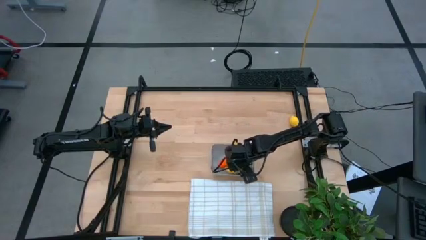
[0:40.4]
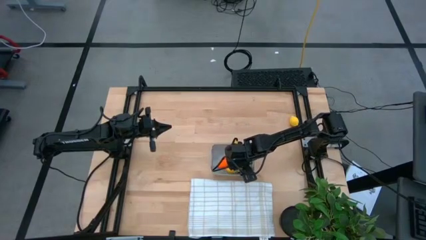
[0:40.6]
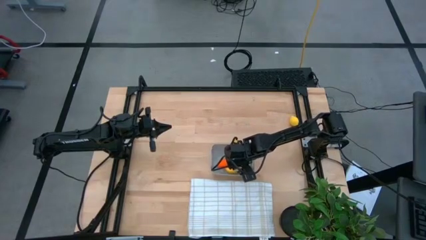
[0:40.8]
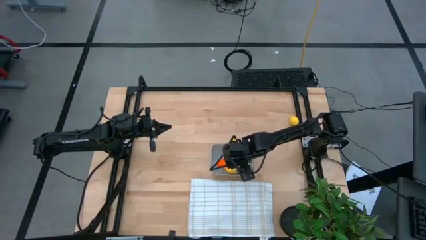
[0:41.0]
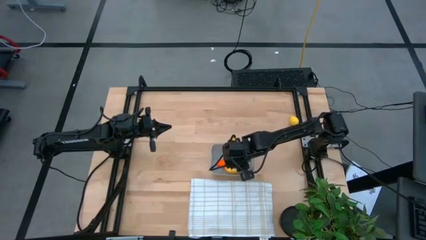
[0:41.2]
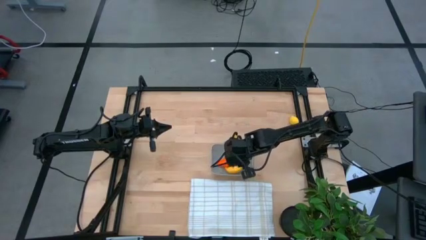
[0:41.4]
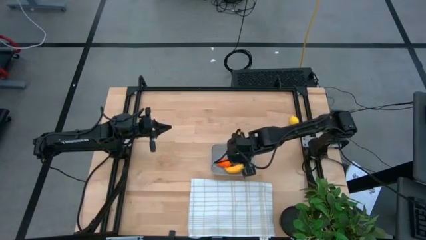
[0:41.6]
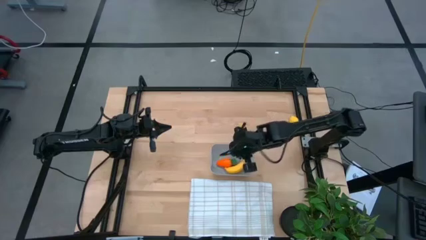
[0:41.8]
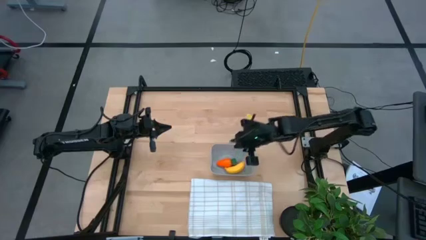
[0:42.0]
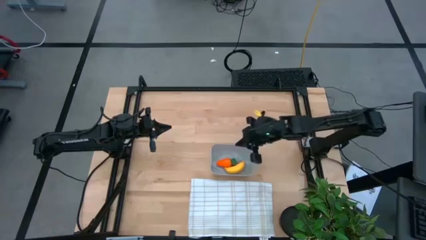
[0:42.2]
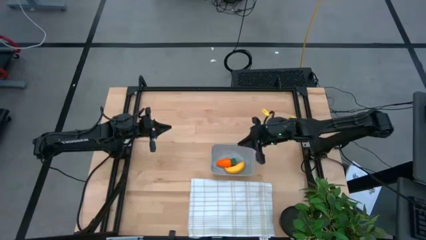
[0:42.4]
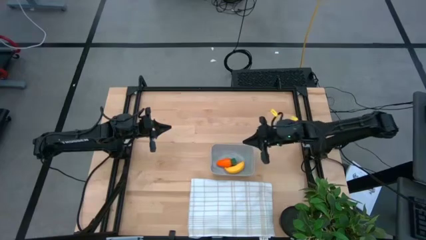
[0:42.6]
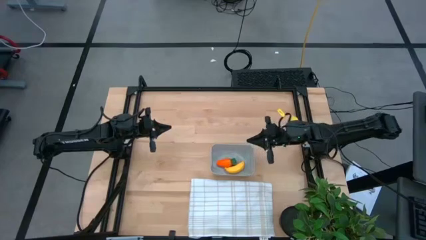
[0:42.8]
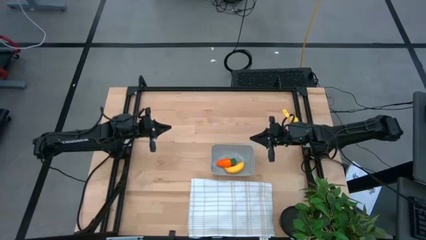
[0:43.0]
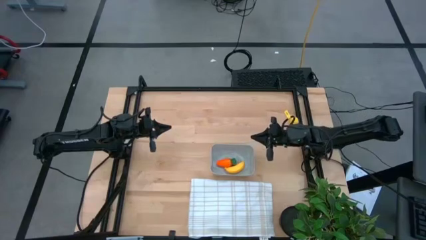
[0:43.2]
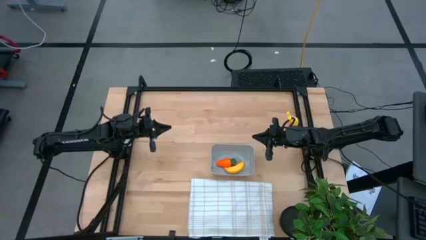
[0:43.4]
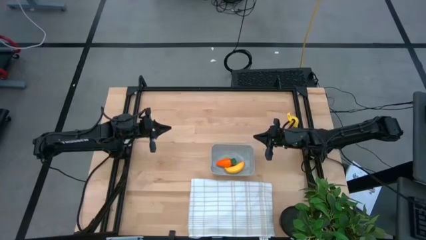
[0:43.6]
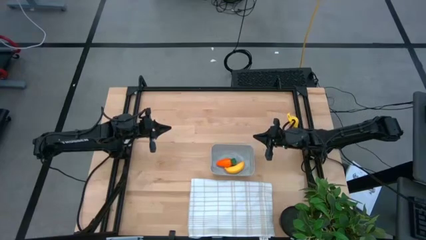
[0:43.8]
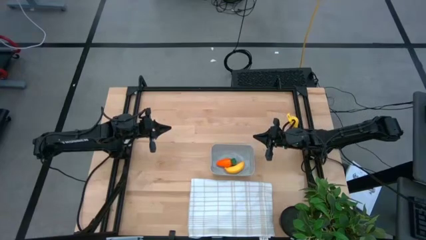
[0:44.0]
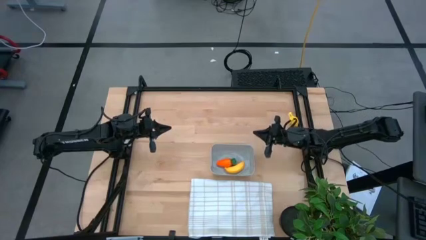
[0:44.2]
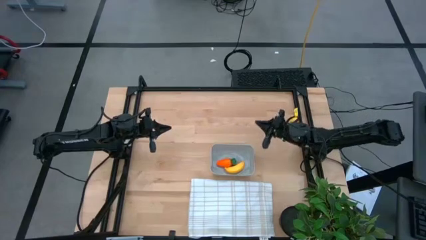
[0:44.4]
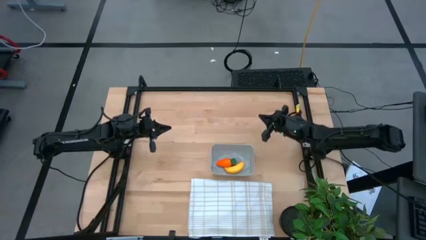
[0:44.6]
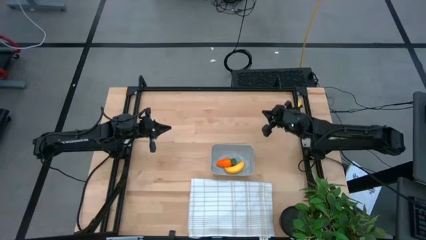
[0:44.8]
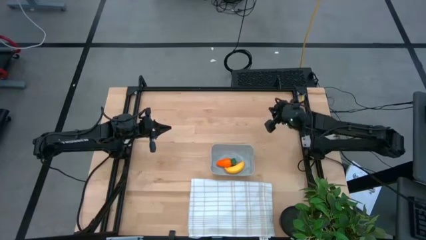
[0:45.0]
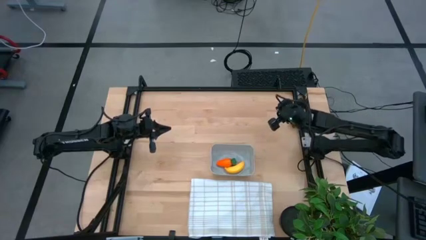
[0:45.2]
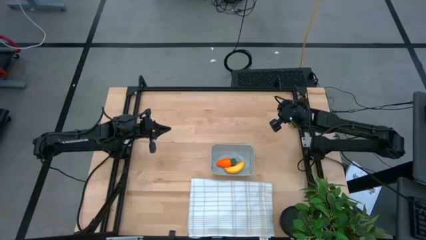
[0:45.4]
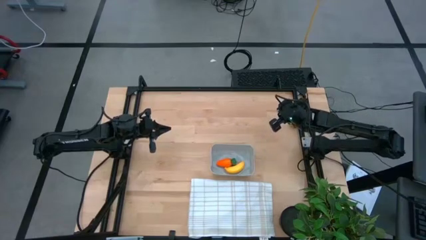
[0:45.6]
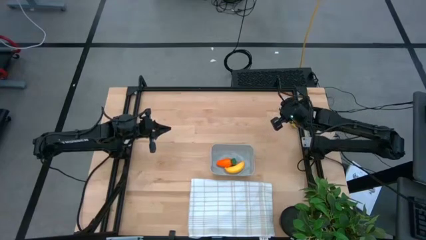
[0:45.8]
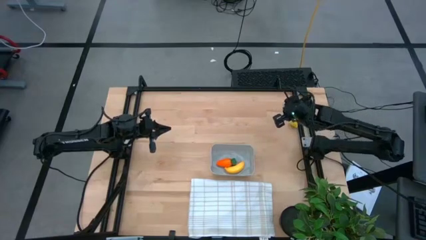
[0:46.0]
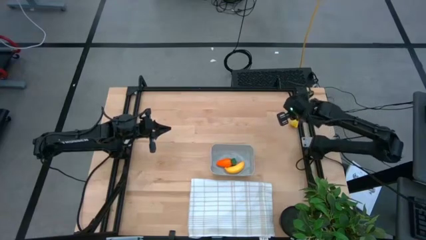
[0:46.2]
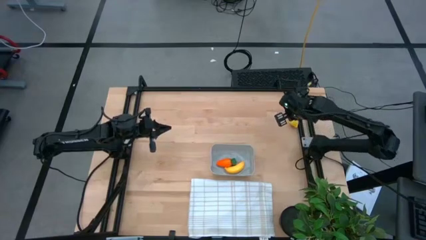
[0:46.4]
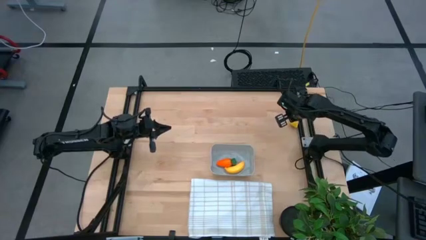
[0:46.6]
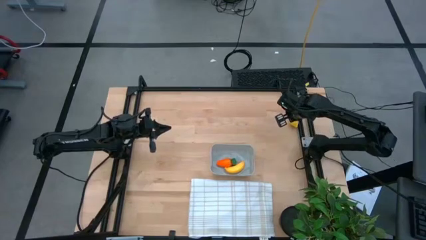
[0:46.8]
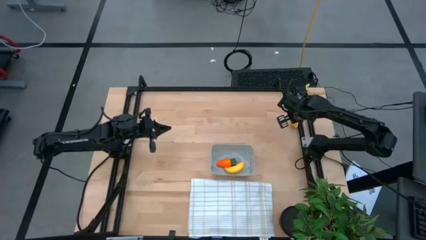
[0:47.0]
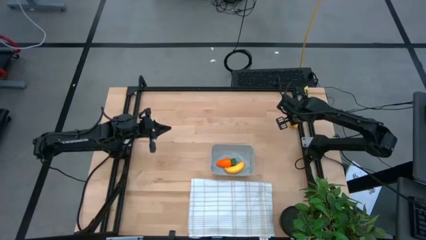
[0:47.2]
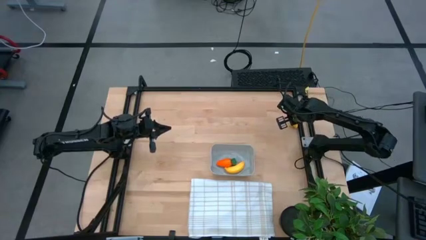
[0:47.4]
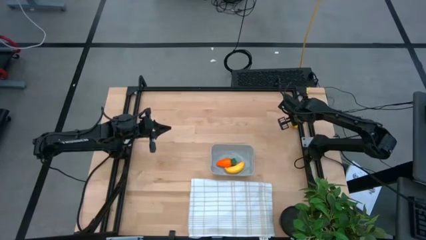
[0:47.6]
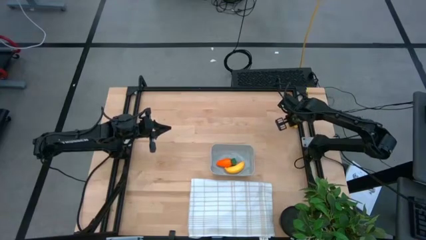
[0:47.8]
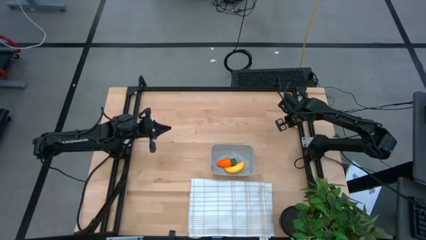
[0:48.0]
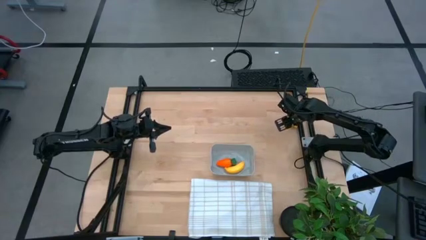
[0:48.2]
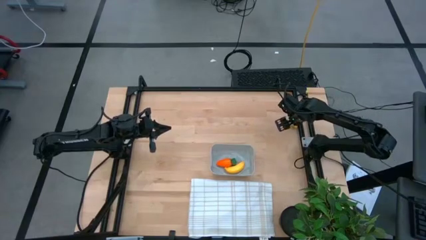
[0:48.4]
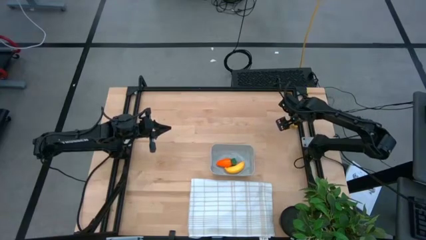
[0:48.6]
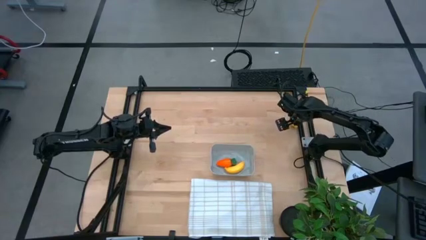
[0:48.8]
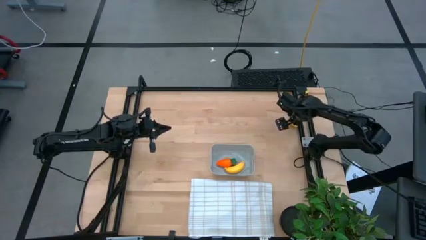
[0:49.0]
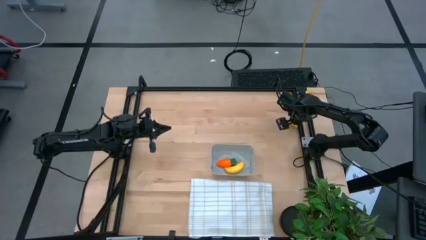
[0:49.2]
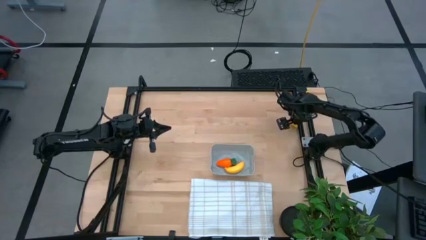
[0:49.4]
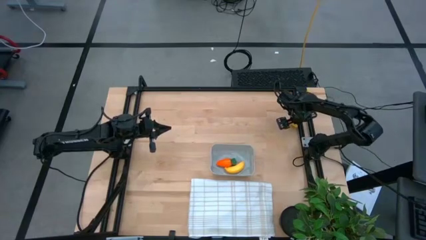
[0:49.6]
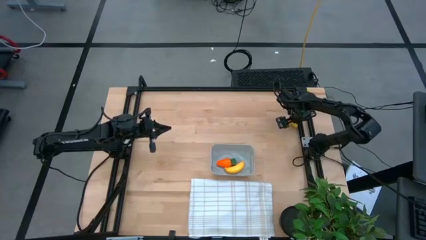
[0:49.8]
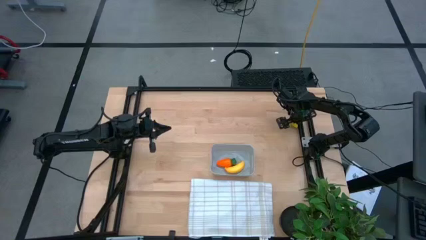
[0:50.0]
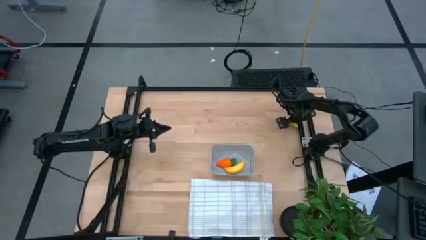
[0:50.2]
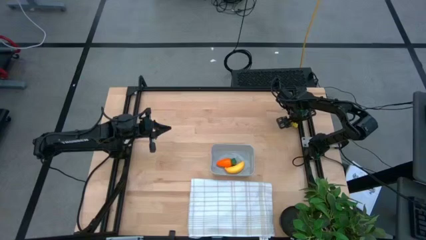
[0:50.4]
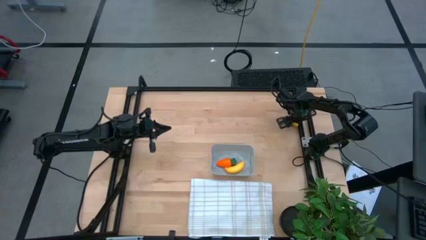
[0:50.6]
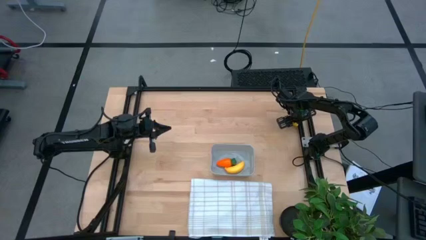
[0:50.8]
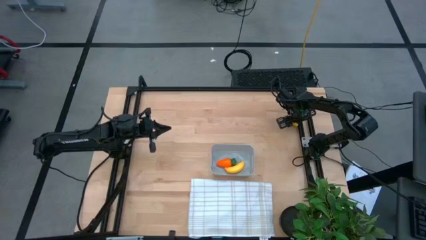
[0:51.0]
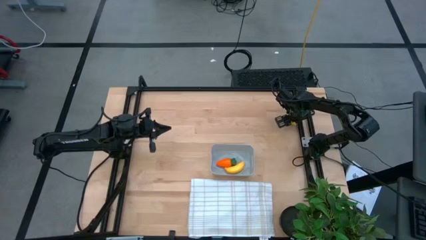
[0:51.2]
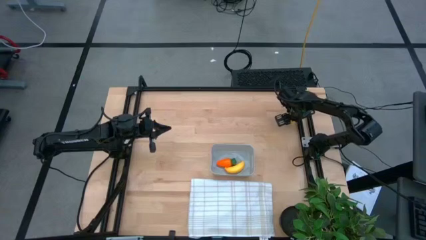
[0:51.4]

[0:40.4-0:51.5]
Task: Pick and placing Produce into tupperware
Put the lemon into the gray bin

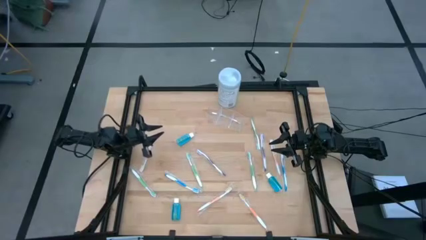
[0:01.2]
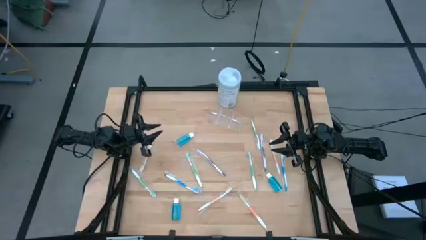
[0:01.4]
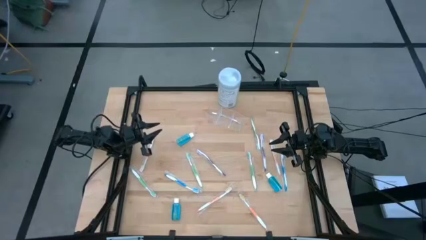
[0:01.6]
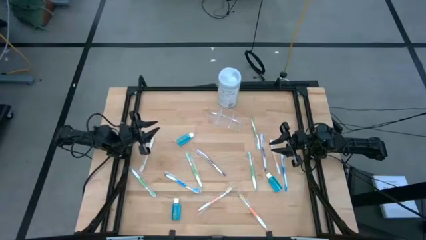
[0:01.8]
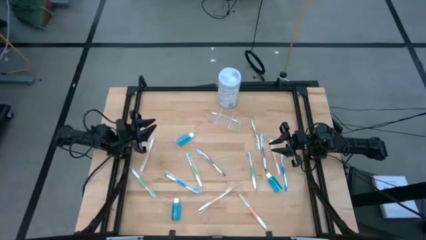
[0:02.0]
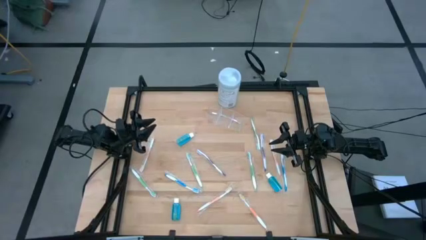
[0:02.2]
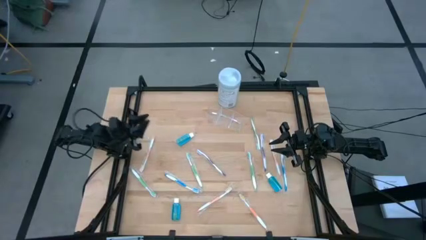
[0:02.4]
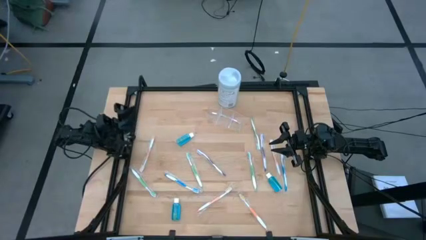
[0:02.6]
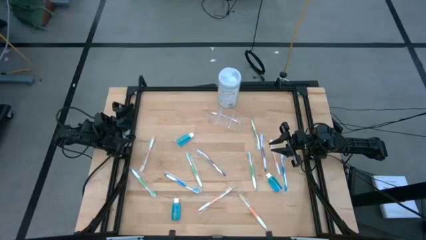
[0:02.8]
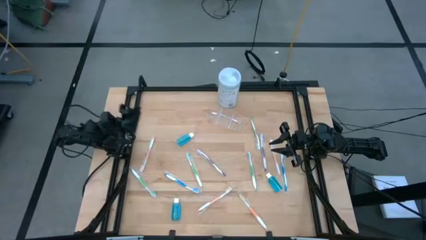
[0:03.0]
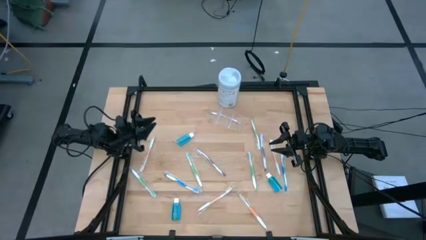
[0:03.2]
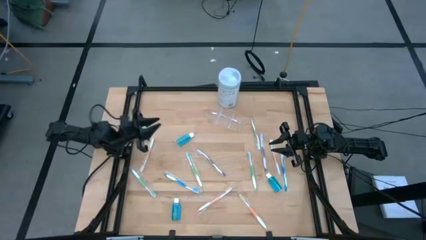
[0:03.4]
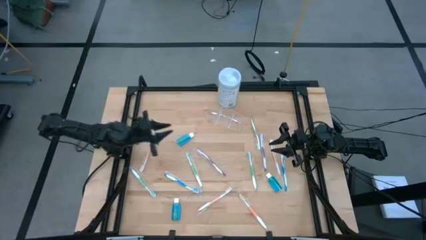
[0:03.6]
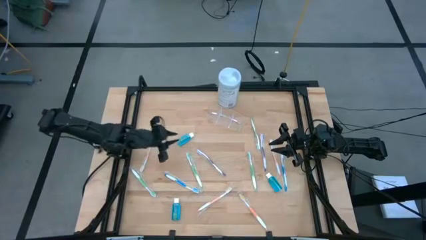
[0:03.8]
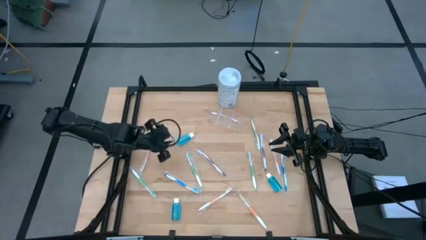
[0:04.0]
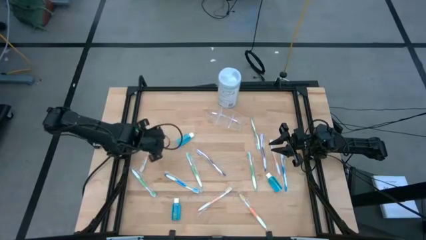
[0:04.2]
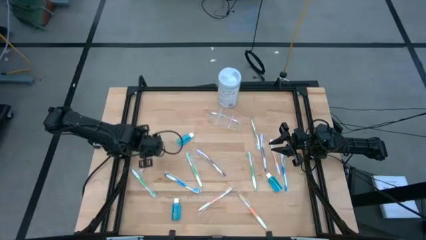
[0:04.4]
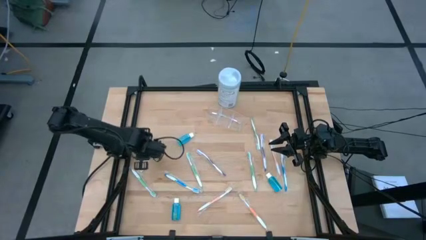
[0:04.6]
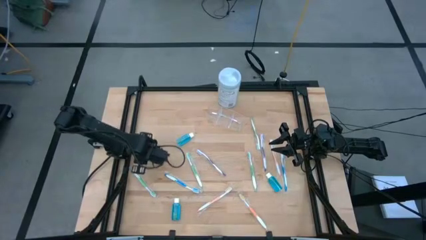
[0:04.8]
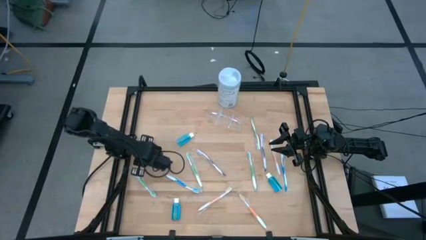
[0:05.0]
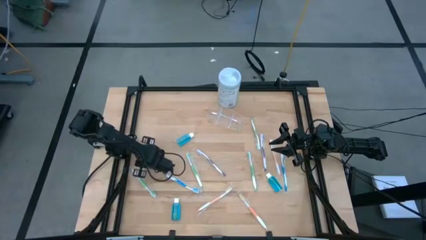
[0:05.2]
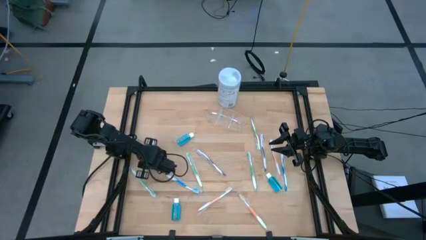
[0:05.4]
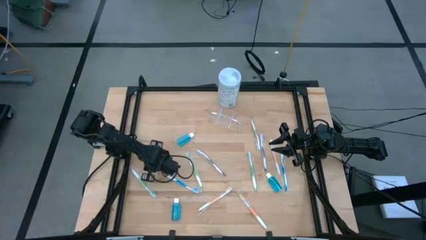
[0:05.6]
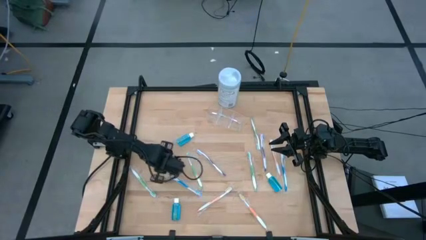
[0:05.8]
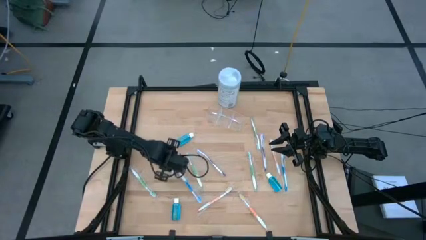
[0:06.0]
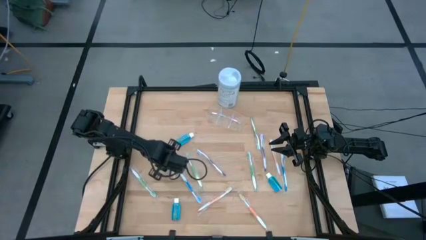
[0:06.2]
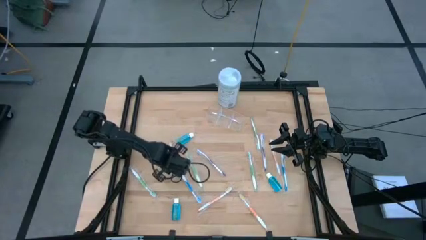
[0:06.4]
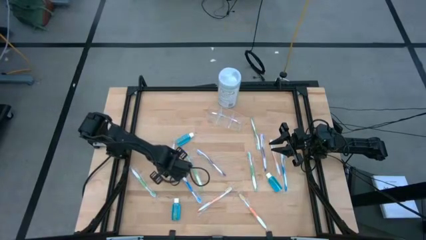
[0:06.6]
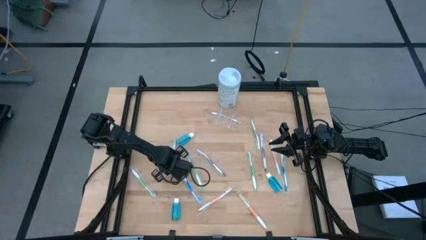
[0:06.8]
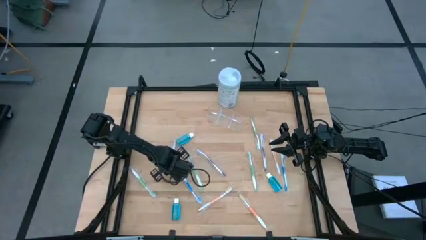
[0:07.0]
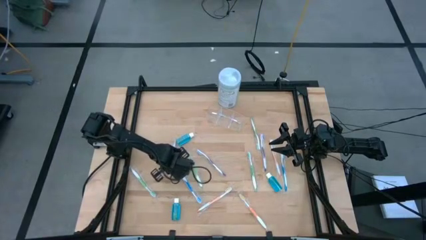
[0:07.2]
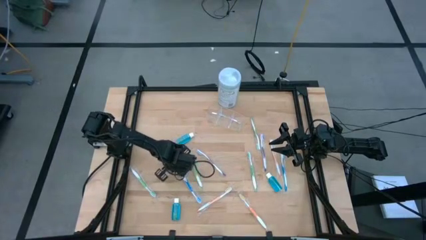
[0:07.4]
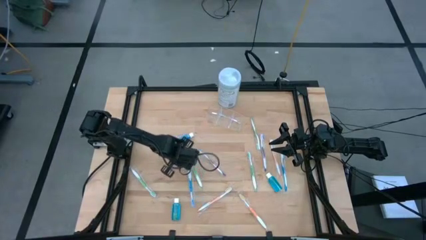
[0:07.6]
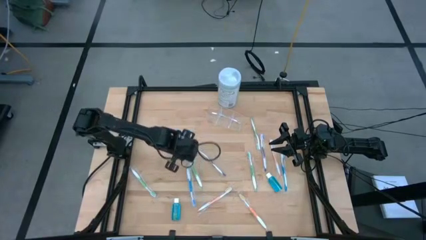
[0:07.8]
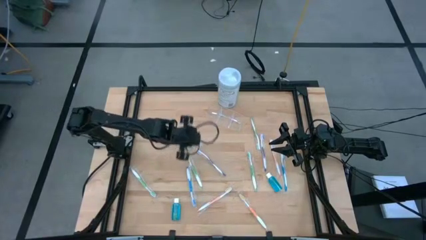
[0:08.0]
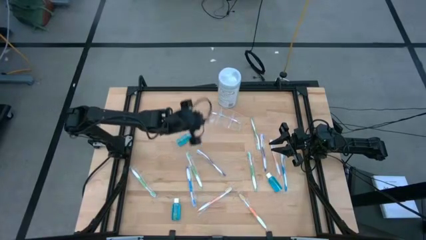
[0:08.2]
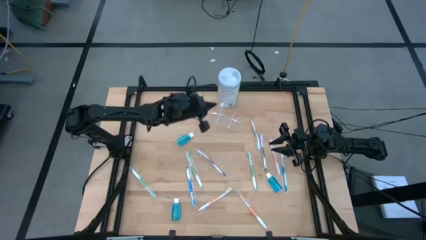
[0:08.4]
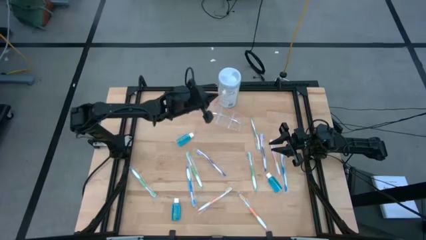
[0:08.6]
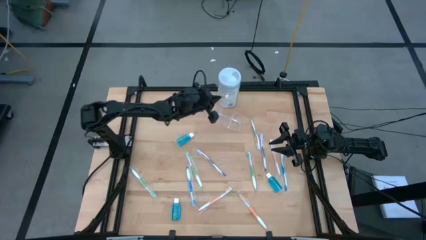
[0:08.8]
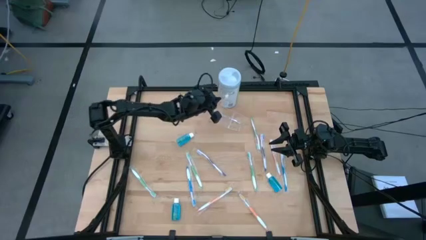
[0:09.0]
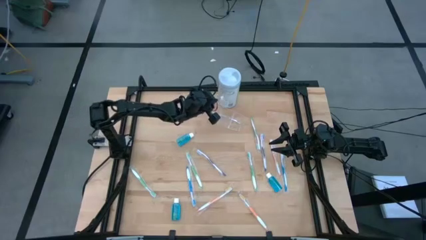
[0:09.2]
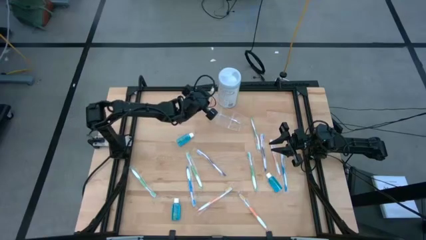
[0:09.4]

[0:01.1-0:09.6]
Task: Pick & Place toothbrushing station
Put the orange toothbrush into the transparent organizer
